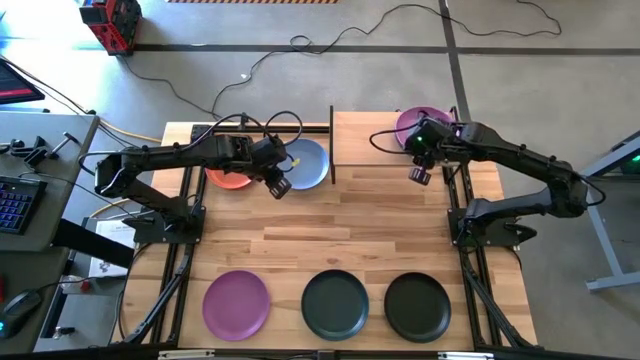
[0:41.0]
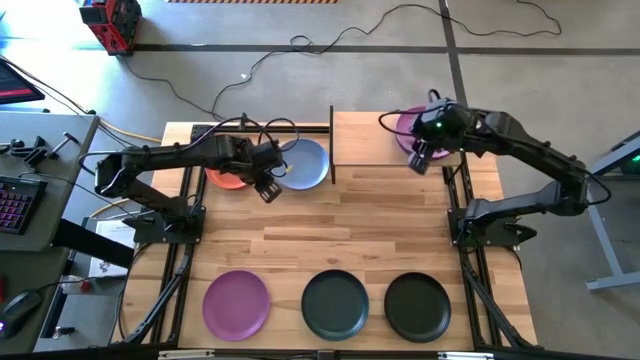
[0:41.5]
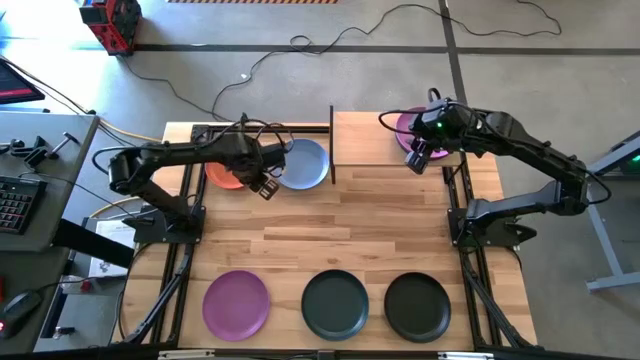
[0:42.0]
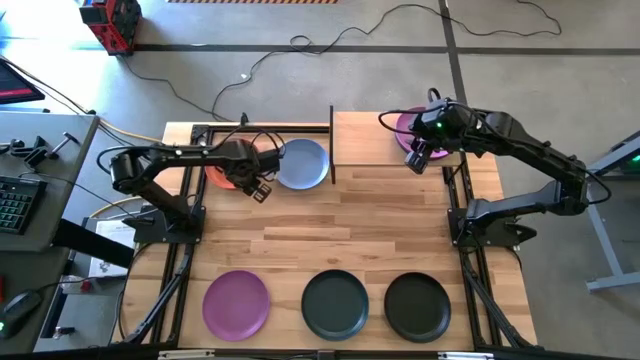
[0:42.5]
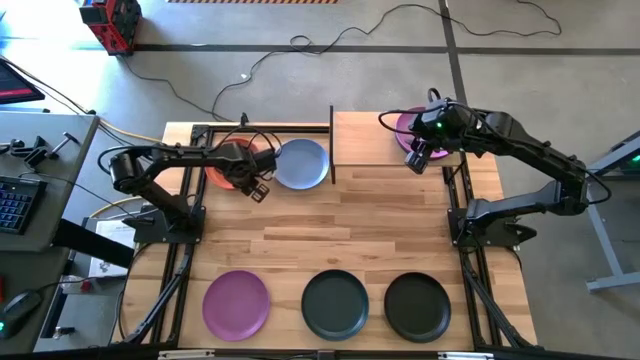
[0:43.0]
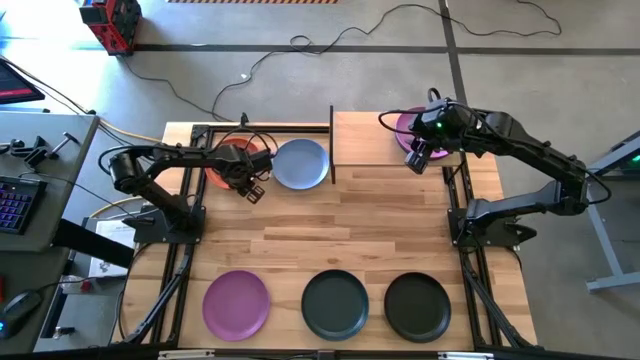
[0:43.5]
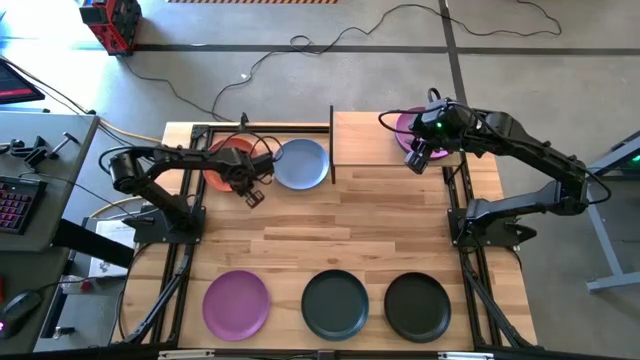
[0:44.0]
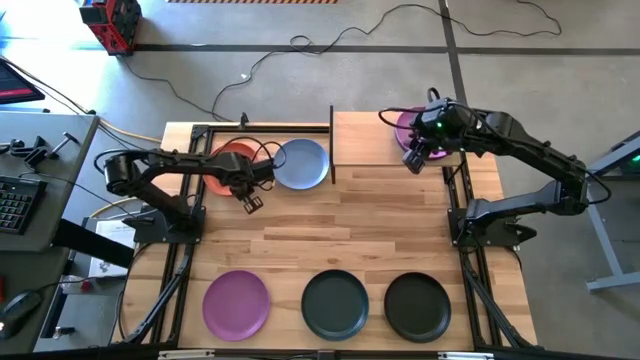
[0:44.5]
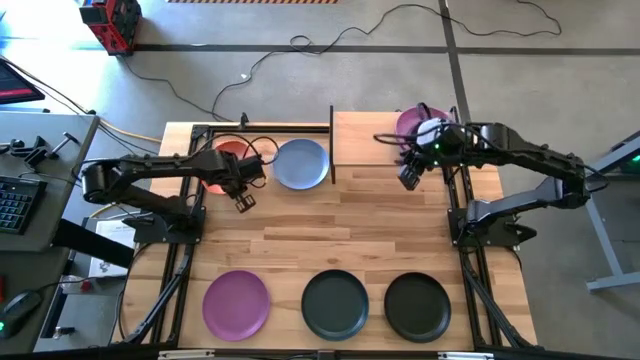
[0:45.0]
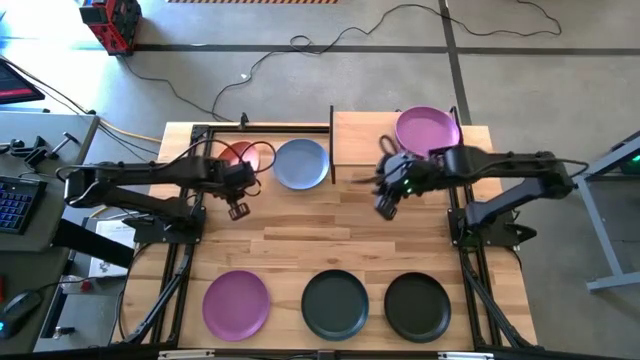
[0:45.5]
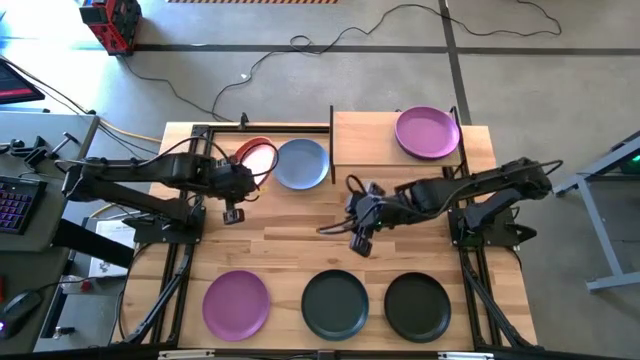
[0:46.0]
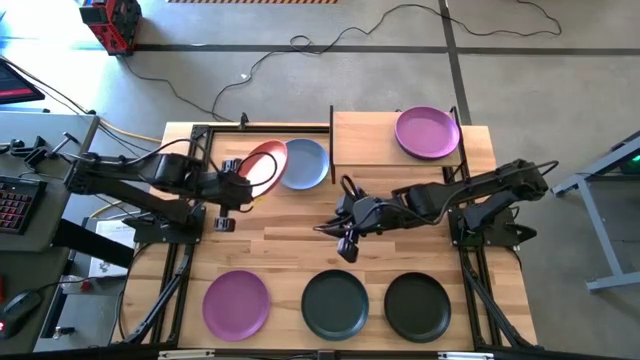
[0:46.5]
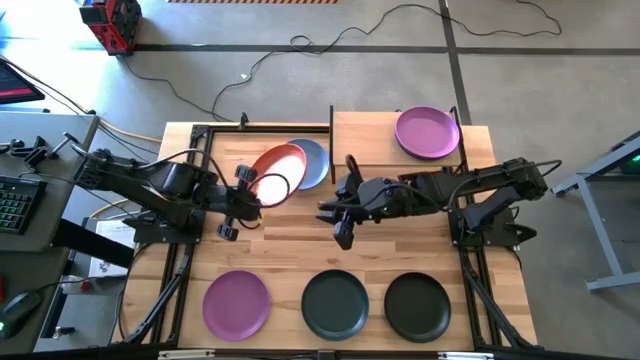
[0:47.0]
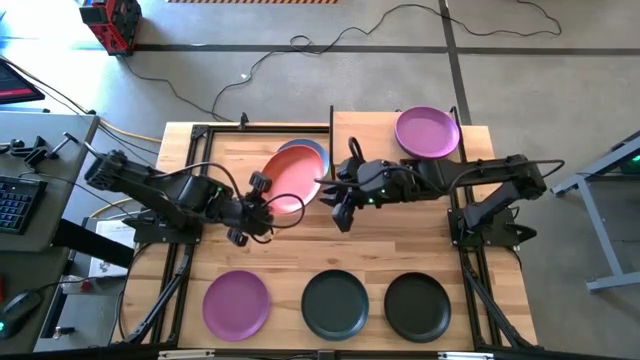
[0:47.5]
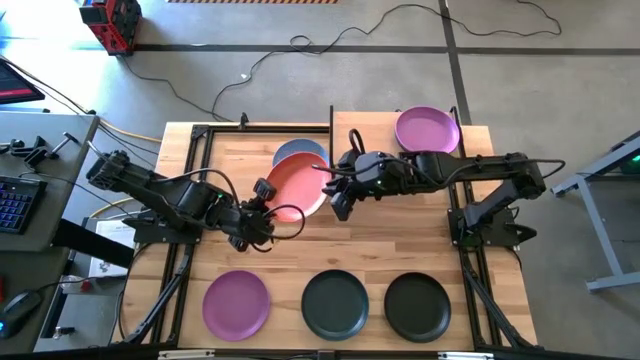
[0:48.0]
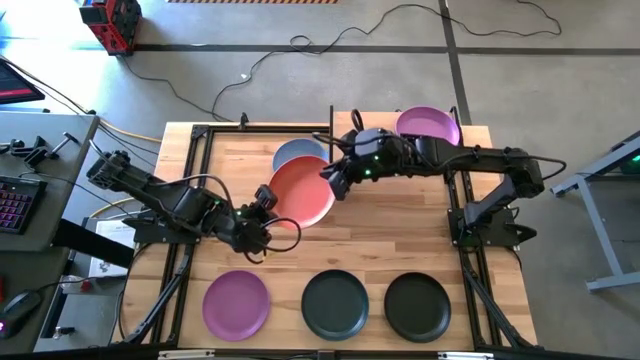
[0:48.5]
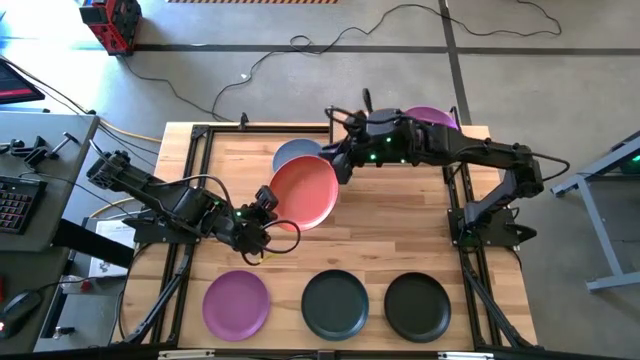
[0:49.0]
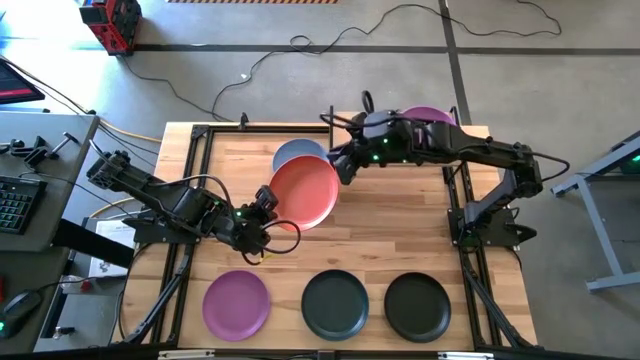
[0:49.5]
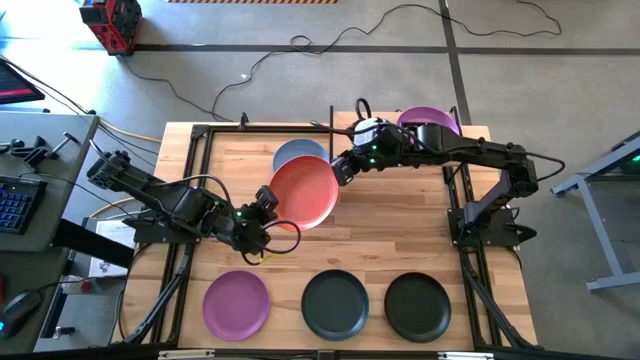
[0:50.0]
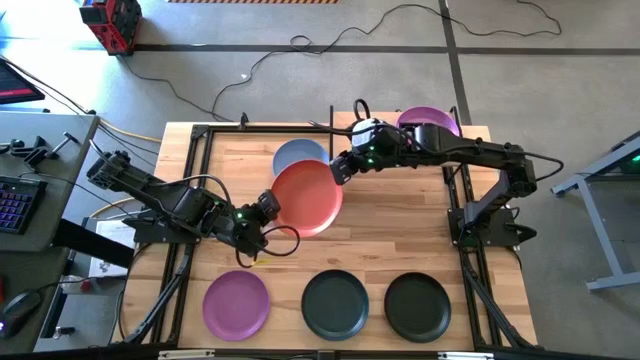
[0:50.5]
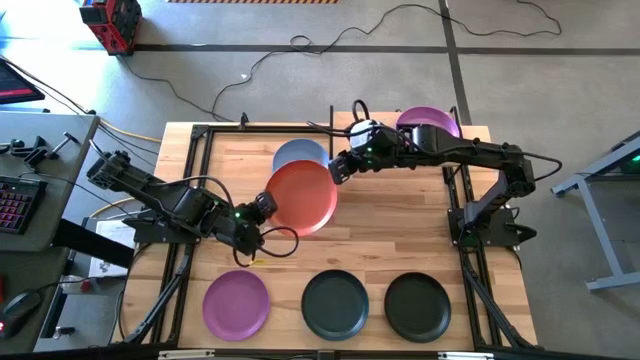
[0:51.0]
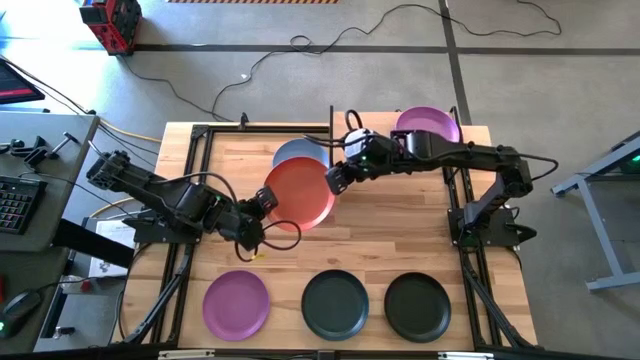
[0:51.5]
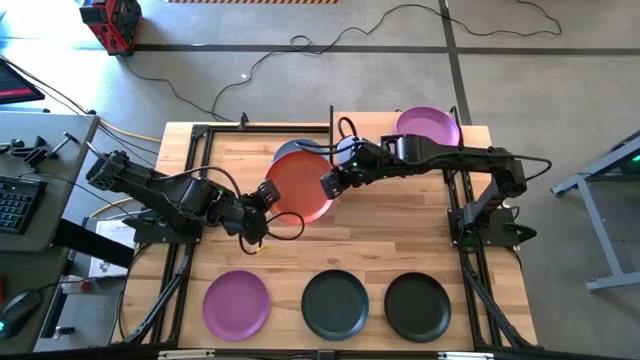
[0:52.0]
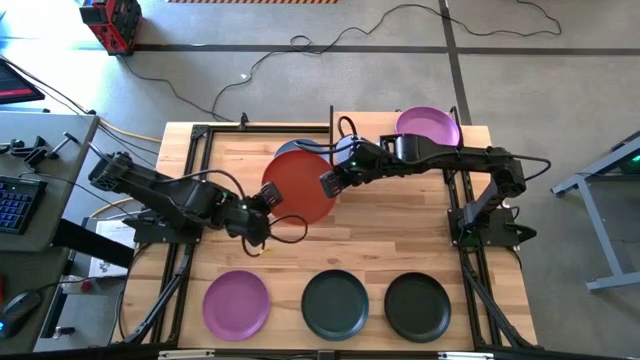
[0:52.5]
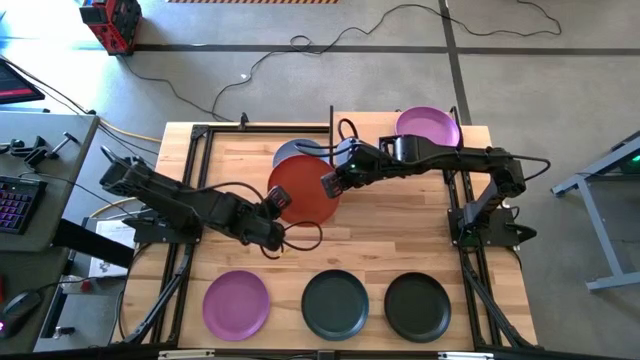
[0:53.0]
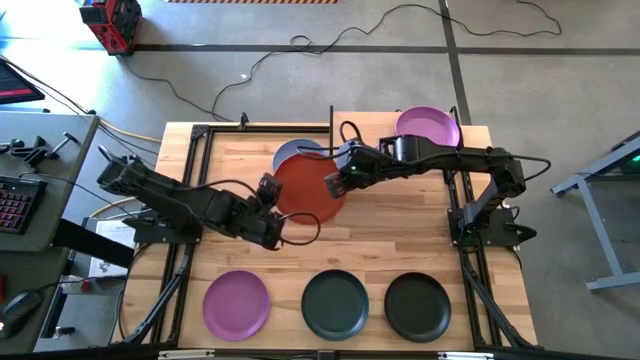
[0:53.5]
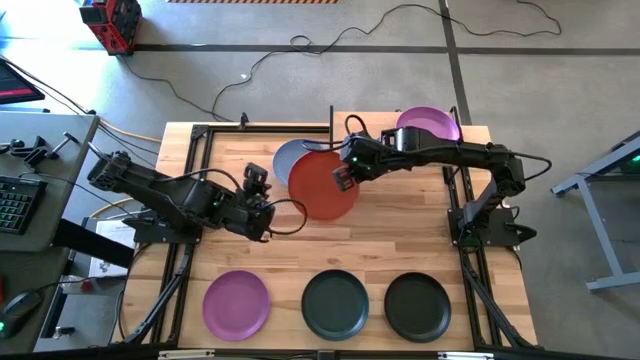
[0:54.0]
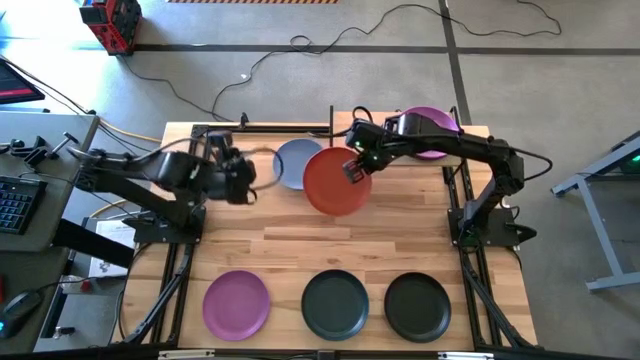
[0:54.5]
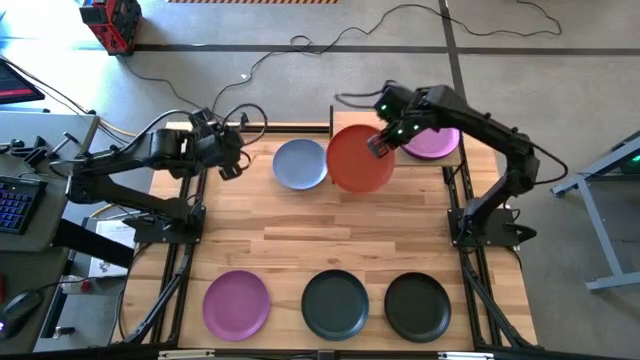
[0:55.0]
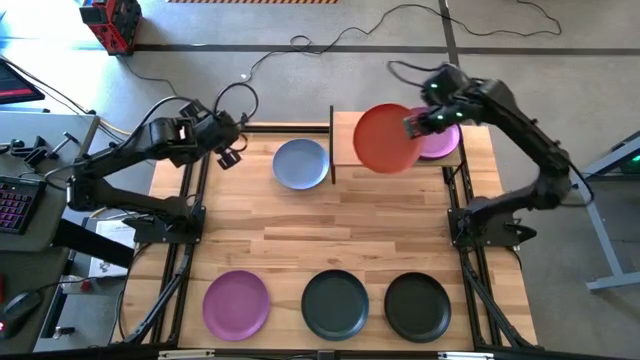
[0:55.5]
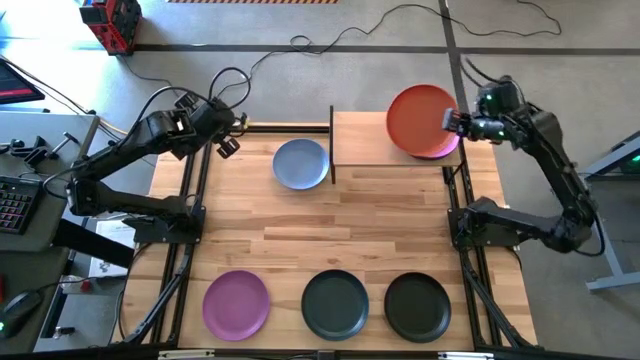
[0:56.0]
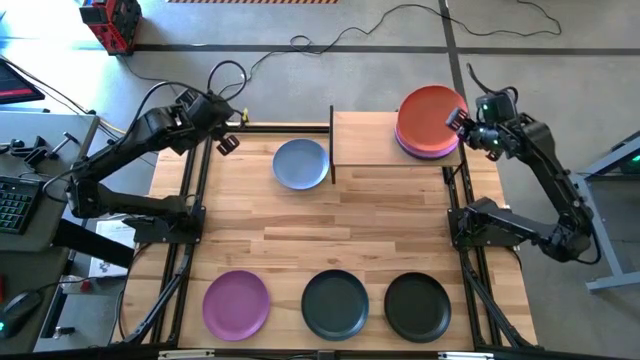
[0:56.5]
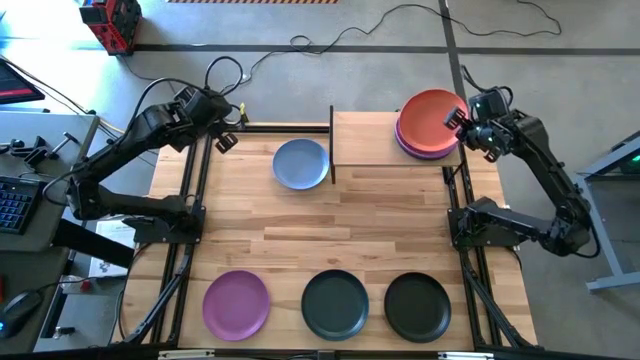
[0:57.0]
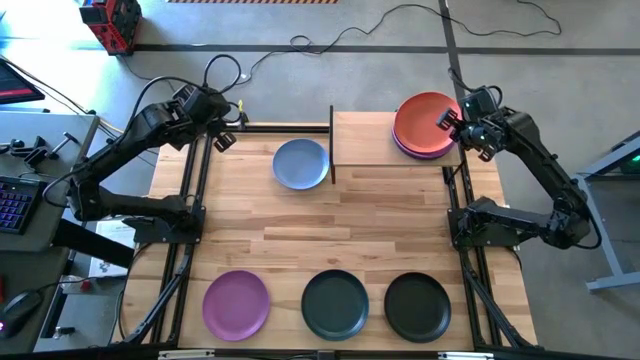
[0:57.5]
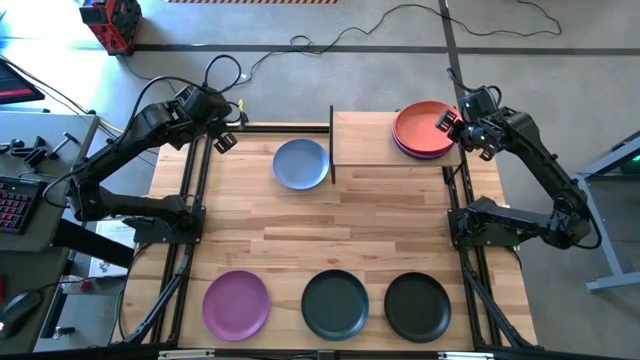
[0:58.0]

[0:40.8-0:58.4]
Task: Place and stack plates onto a shelf
Stack the orange plate on top of the violet plate on the shelf

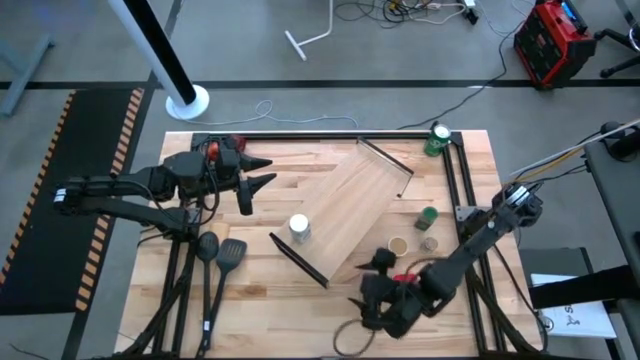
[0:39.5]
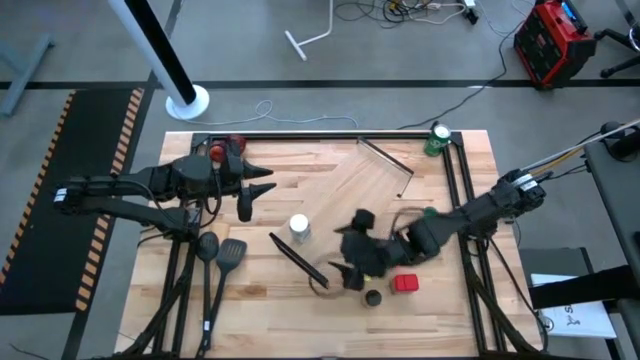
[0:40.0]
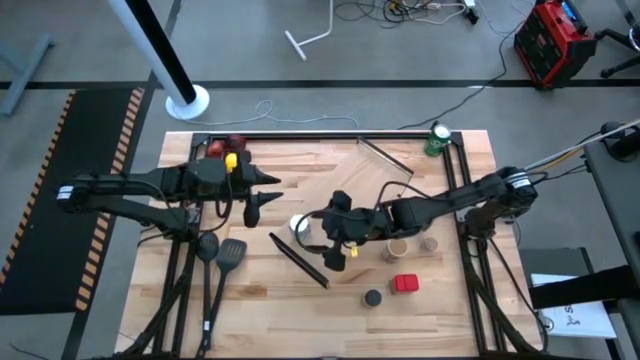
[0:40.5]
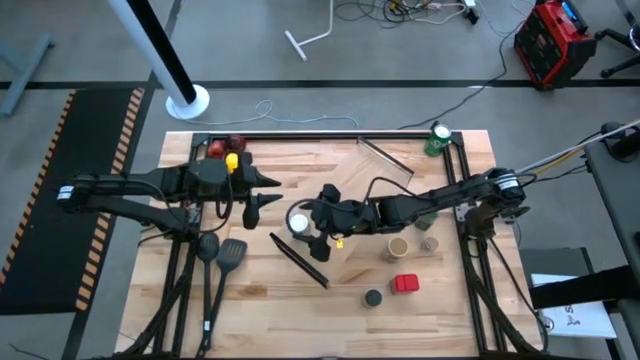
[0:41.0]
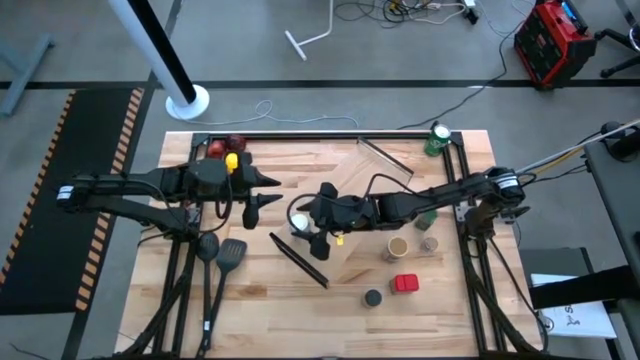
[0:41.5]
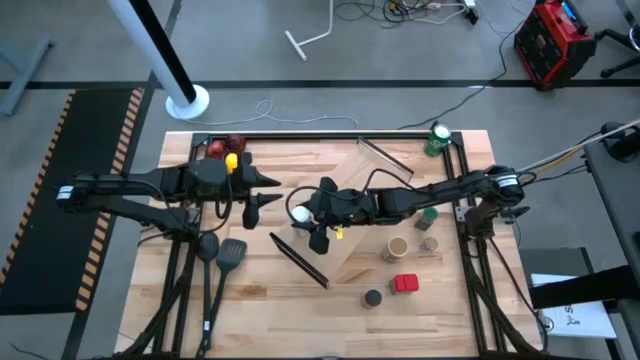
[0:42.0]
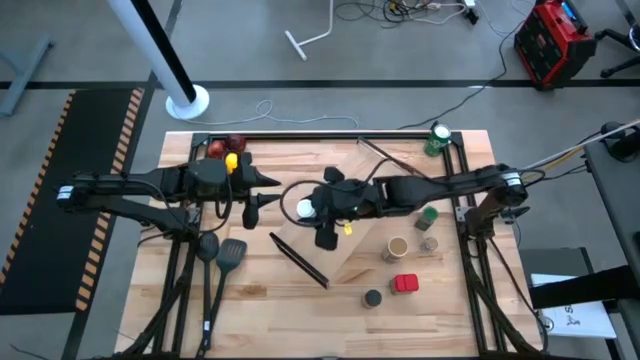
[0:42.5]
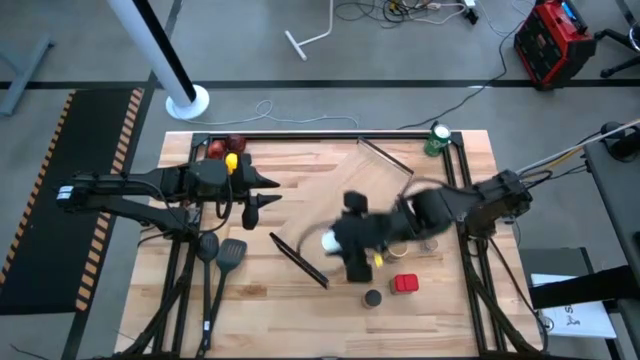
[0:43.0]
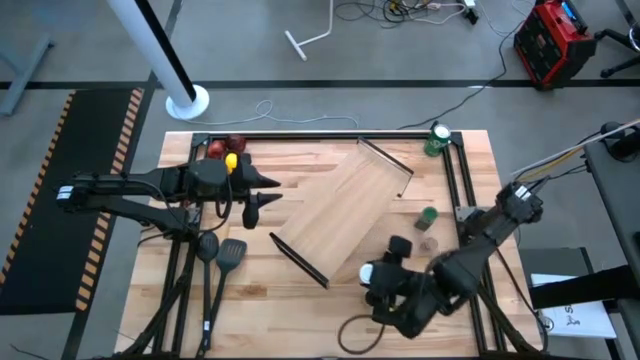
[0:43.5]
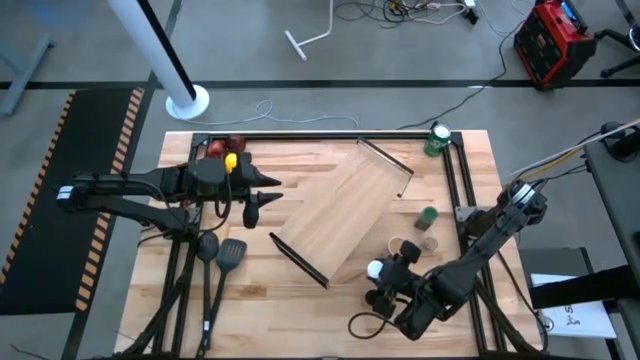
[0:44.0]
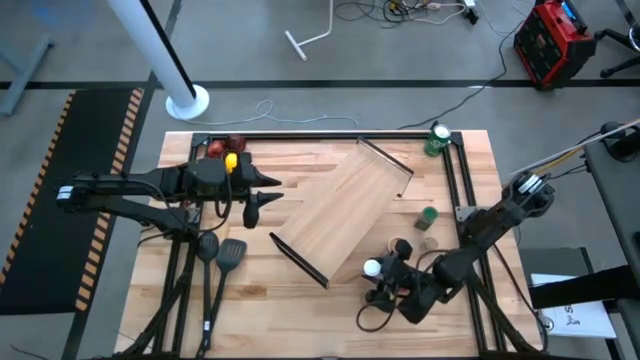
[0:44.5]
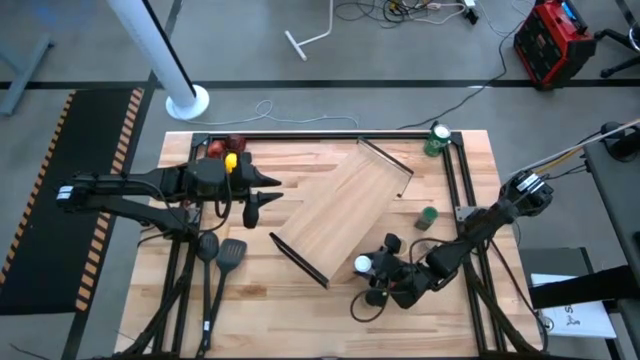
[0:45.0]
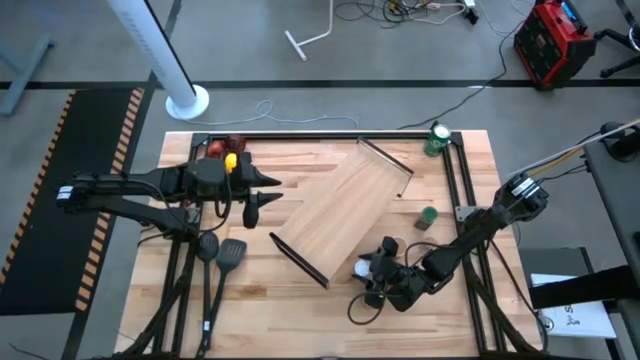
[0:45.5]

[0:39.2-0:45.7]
Task: Shelf spices
Remove the white seasoning bottle from the shelf
